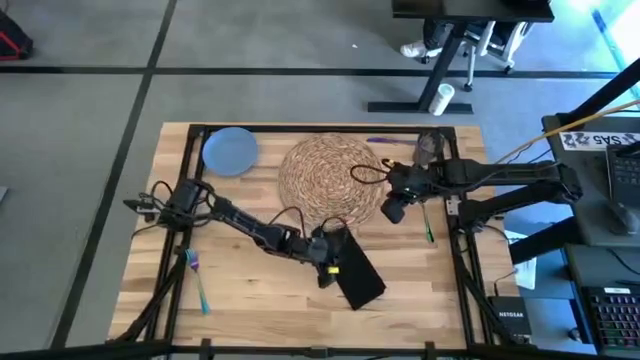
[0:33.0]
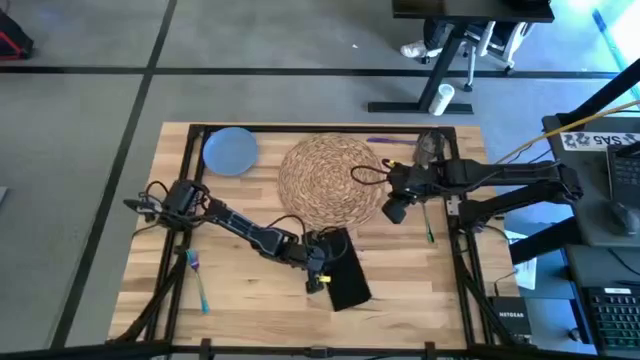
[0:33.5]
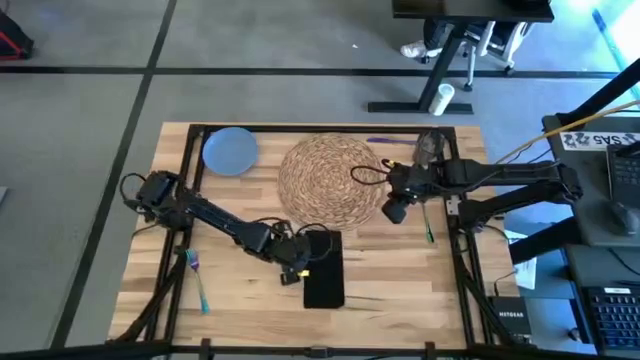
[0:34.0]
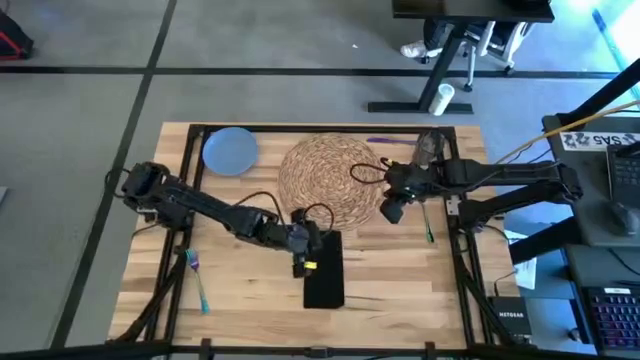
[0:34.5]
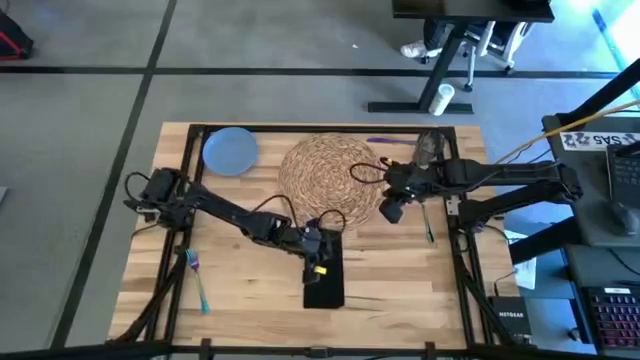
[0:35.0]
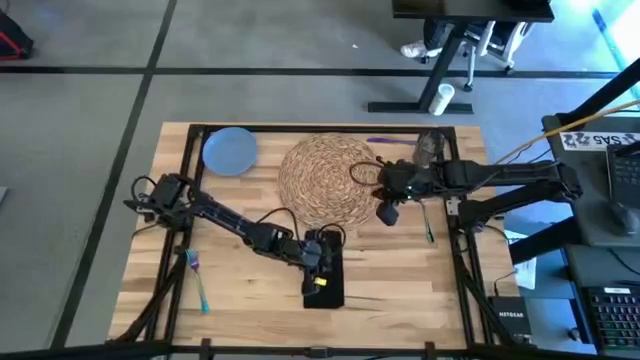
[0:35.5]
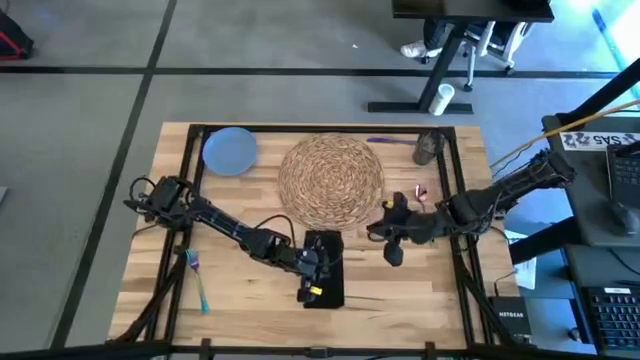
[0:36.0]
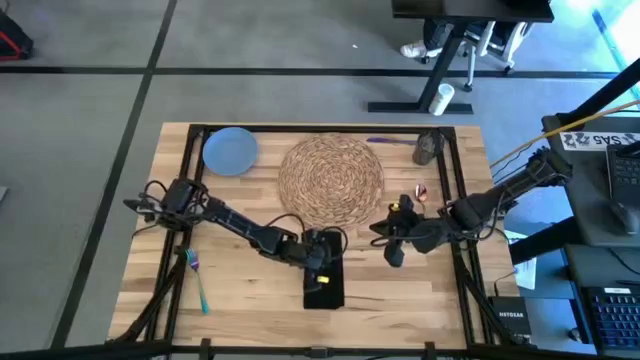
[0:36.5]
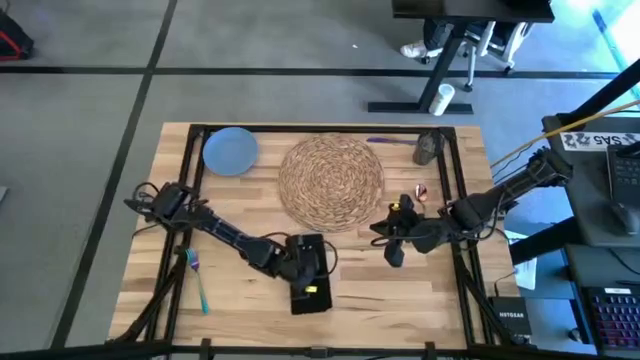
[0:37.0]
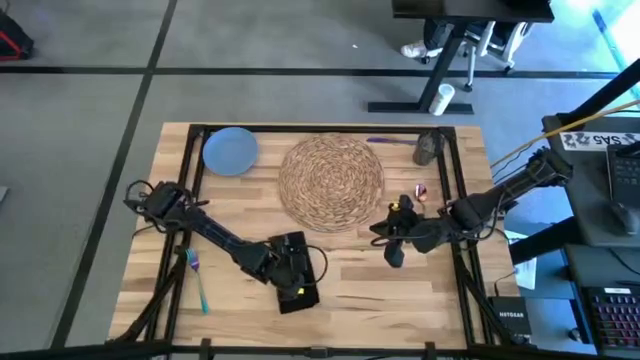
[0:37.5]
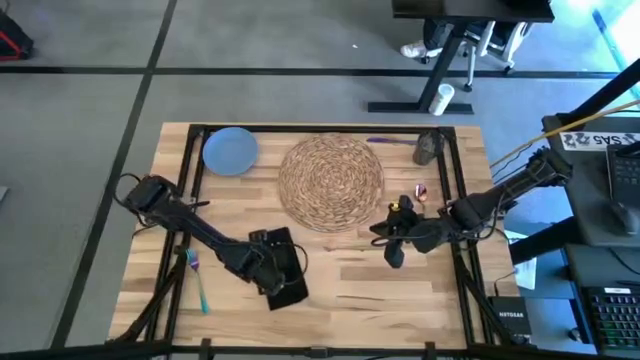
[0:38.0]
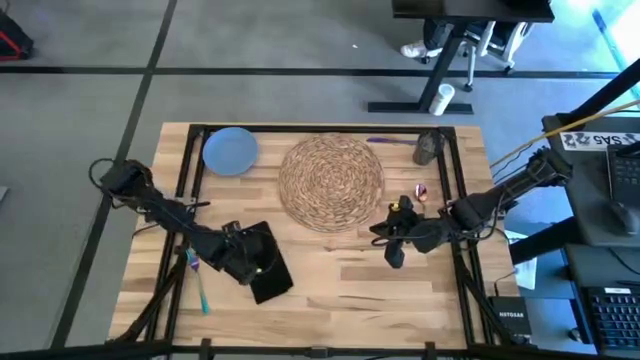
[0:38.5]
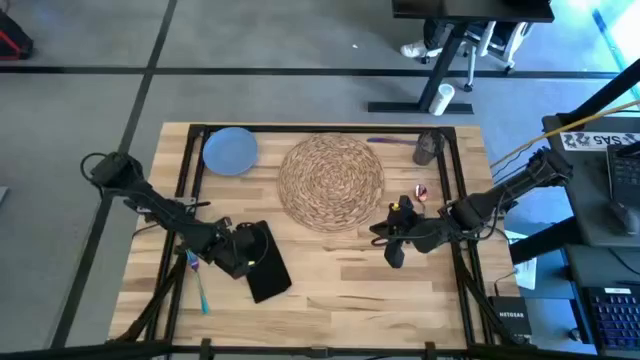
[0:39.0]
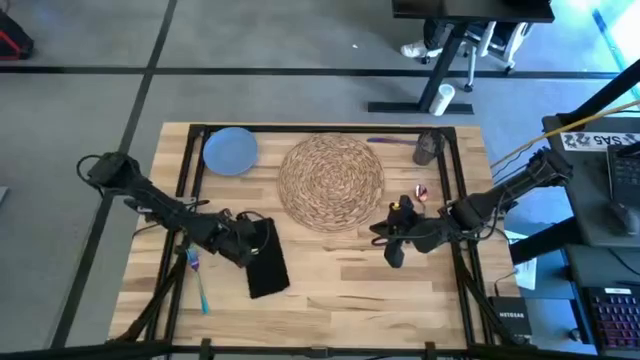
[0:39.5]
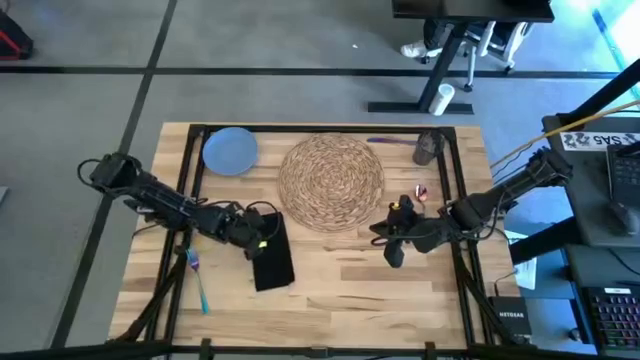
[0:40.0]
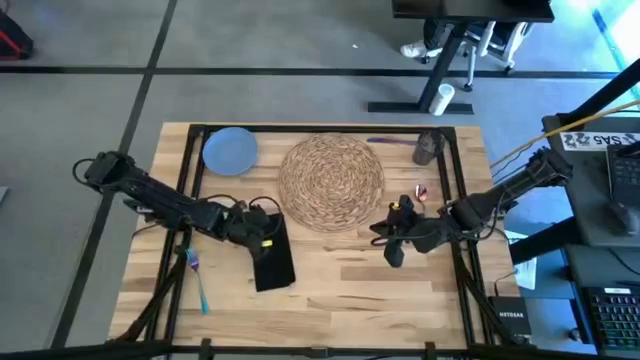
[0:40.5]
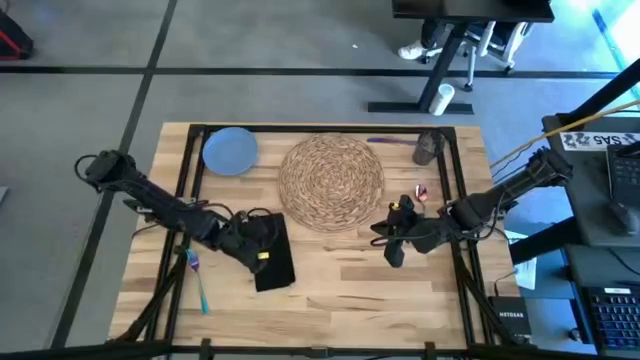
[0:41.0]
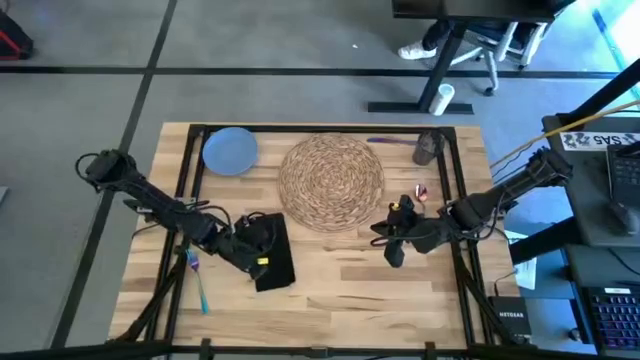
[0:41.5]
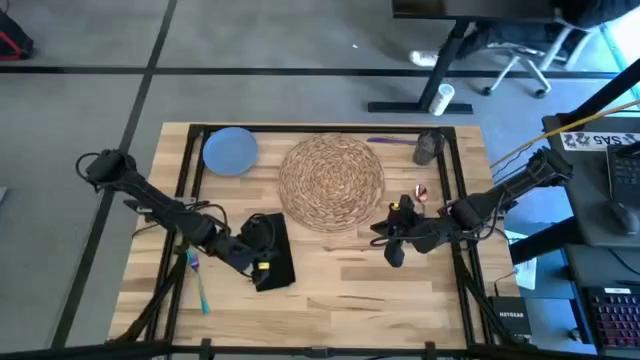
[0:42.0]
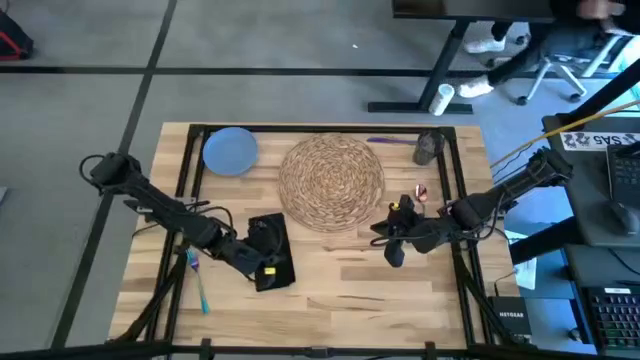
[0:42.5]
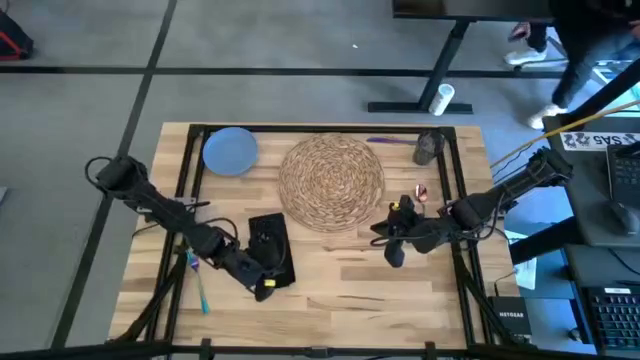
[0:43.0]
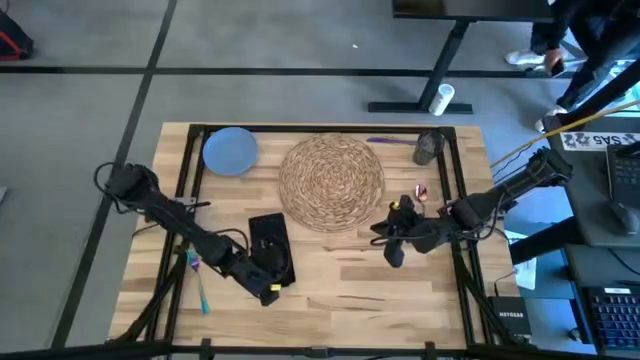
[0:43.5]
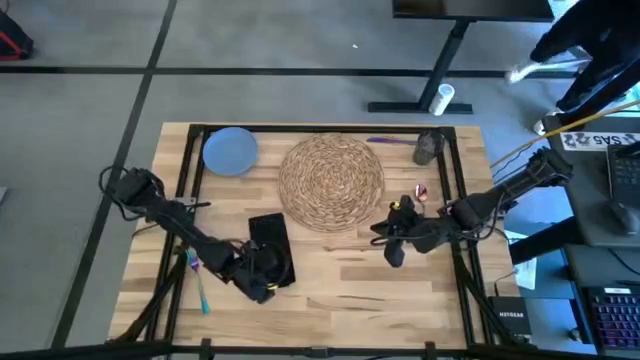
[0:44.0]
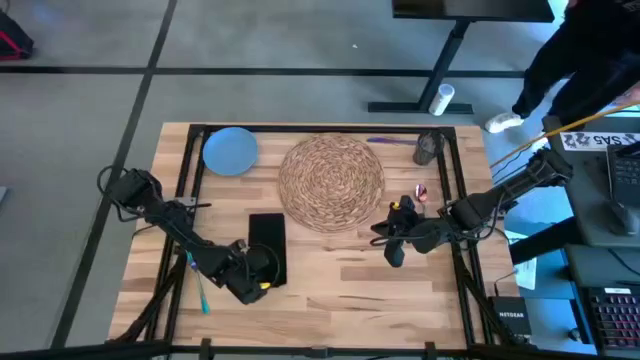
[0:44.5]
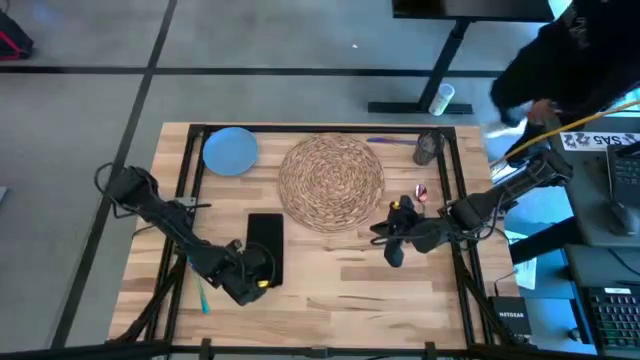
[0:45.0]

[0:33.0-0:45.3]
Task: Set table place
Put the black table napkin to the left side of the brown placemat

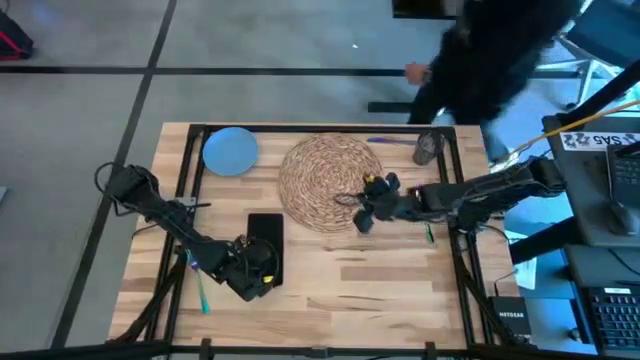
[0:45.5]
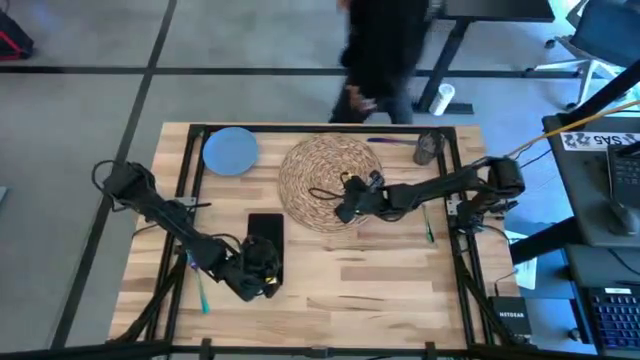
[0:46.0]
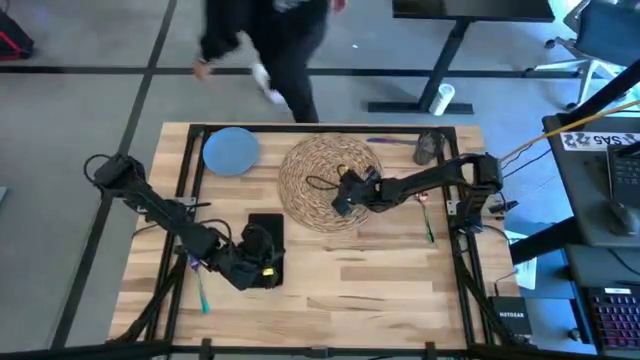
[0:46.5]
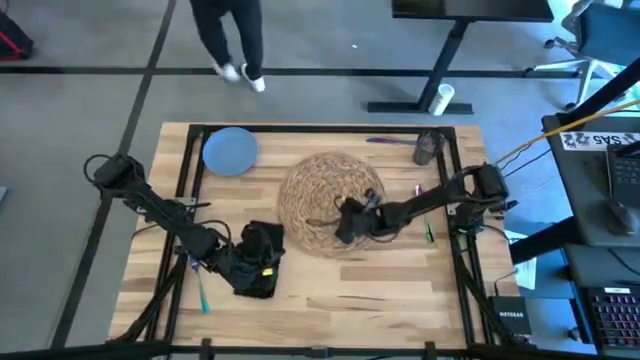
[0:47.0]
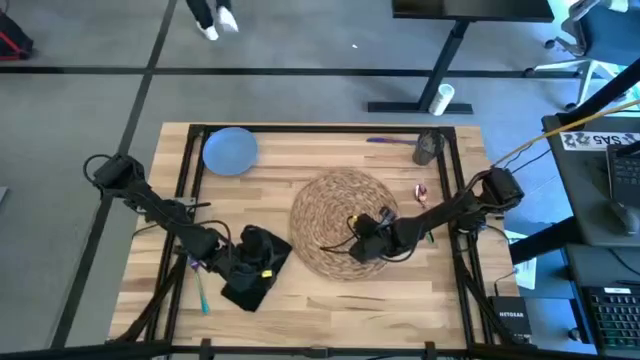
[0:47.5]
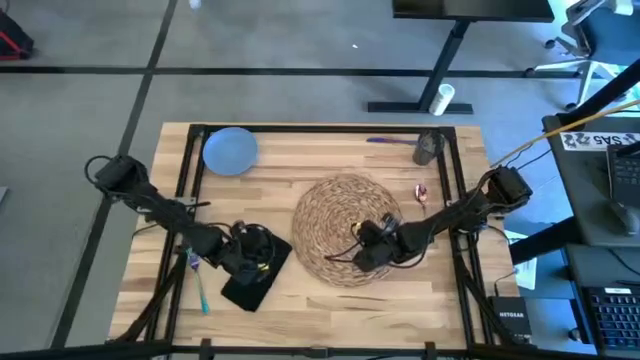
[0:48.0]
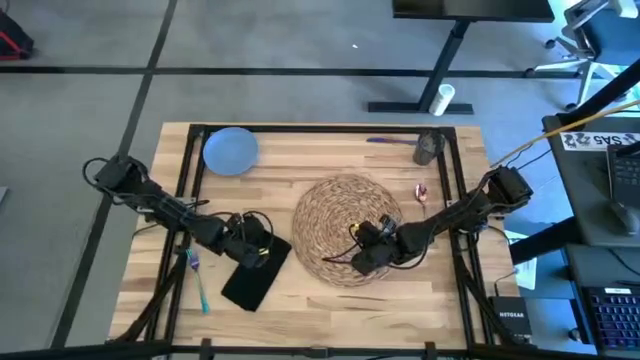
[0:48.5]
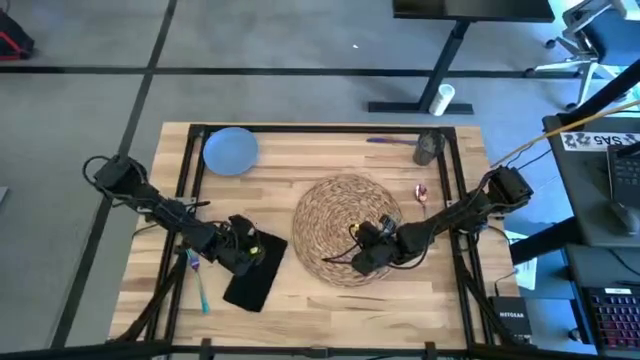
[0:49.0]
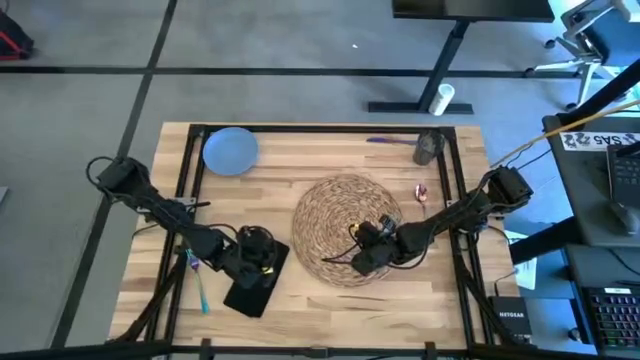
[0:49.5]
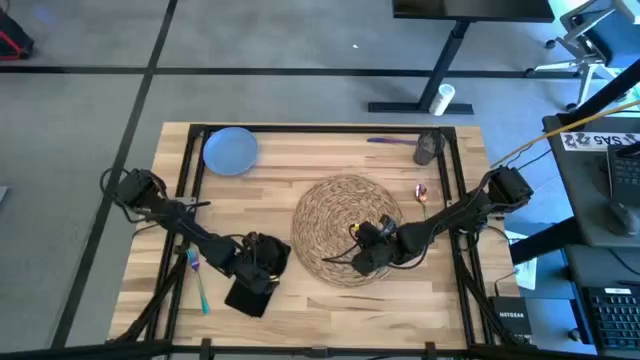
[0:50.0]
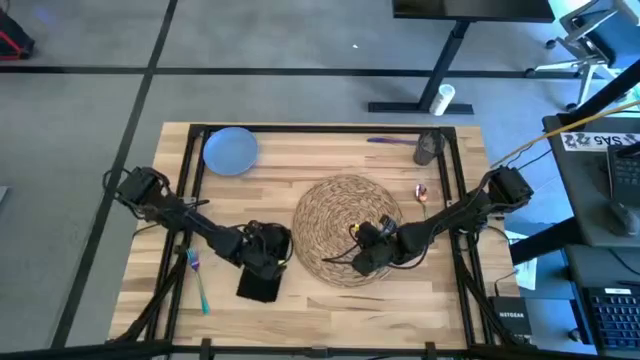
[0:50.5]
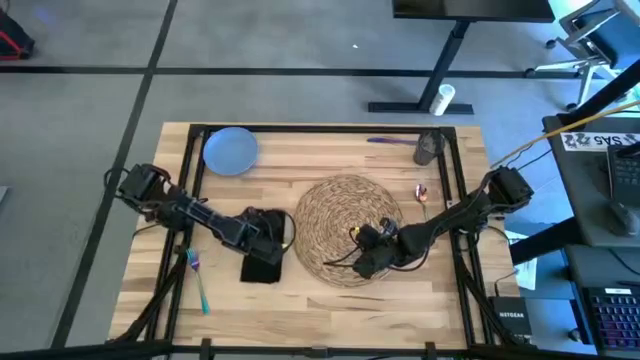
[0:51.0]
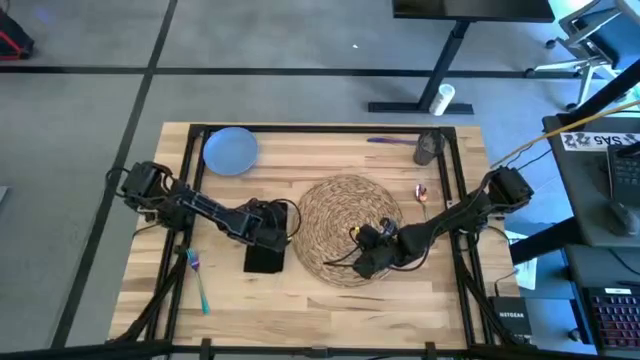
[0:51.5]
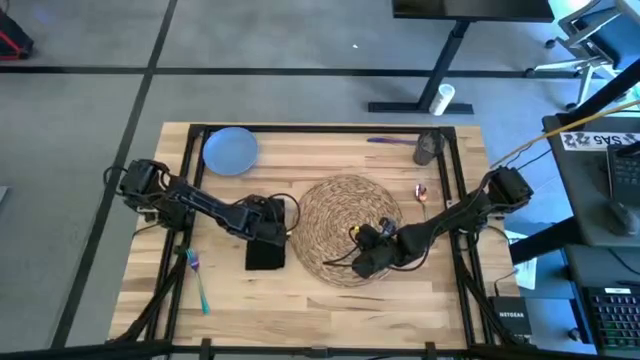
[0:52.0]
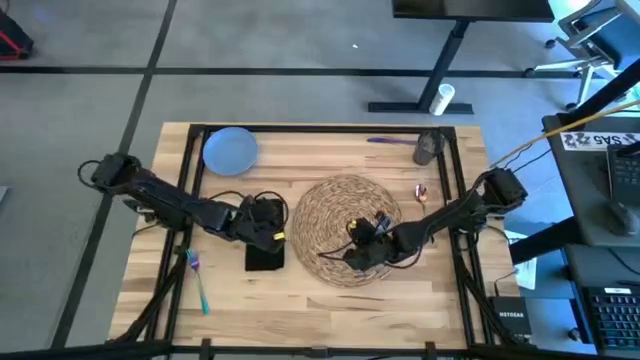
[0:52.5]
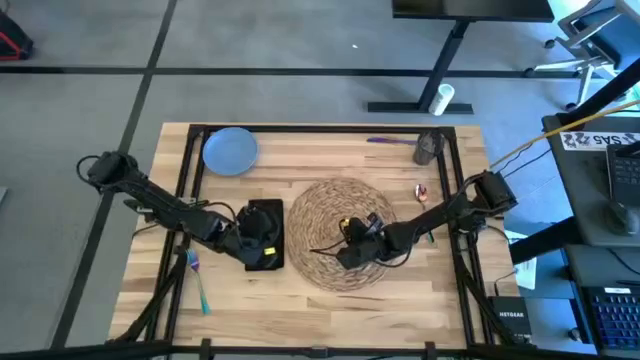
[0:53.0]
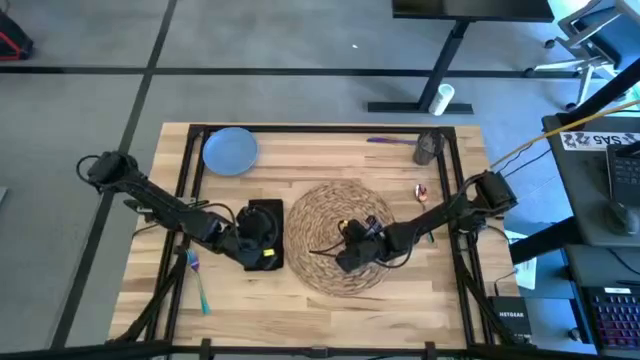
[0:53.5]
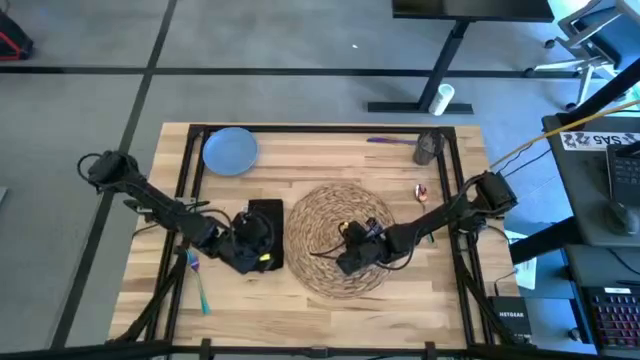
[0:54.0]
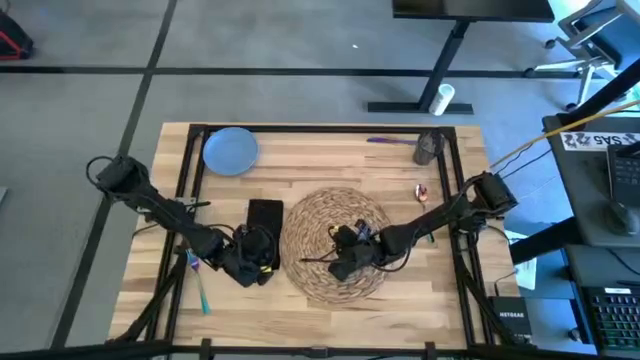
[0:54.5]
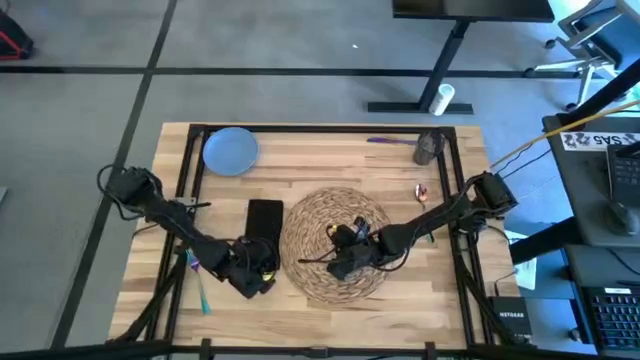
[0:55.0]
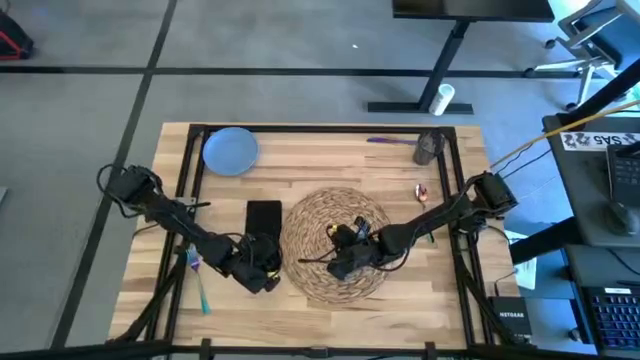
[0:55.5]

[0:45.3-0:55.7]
Move the brown placemat on the center of the table
